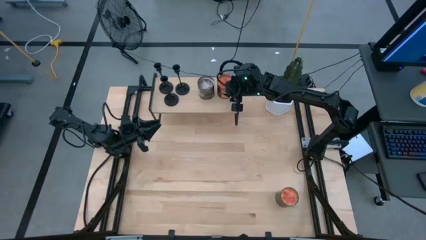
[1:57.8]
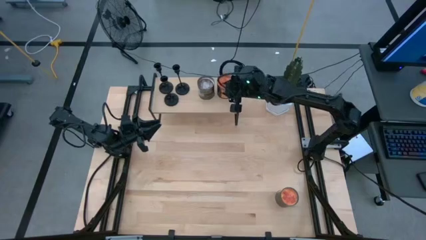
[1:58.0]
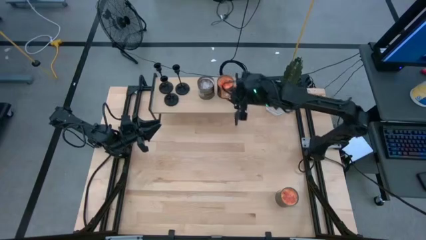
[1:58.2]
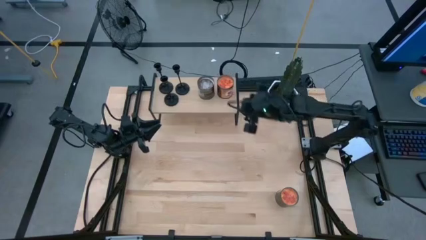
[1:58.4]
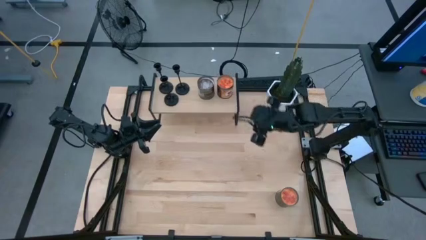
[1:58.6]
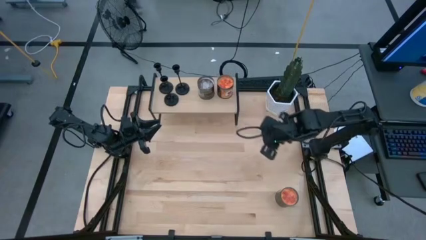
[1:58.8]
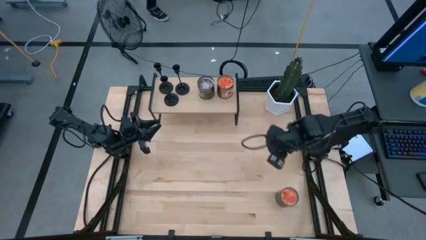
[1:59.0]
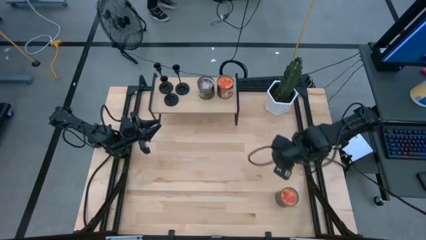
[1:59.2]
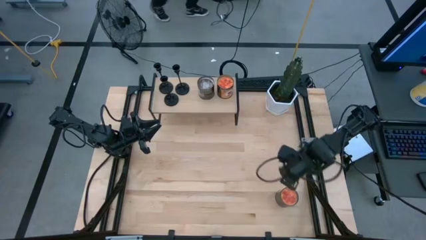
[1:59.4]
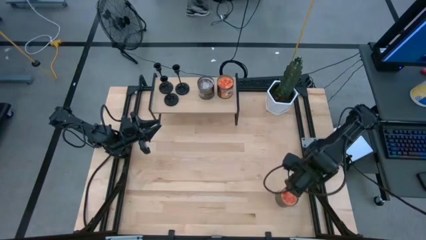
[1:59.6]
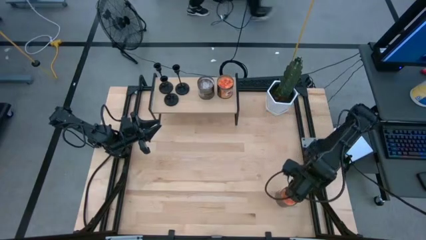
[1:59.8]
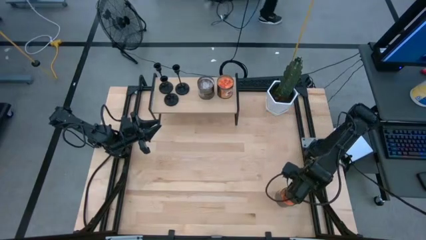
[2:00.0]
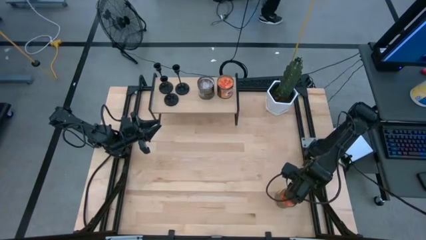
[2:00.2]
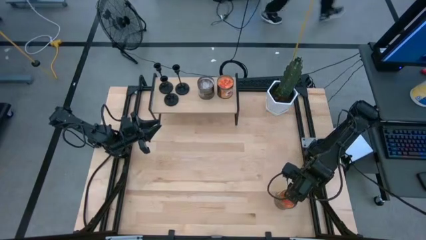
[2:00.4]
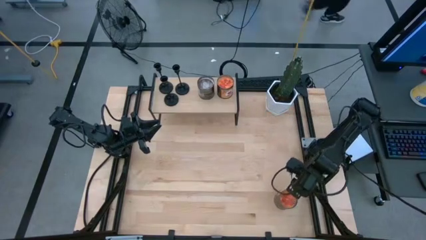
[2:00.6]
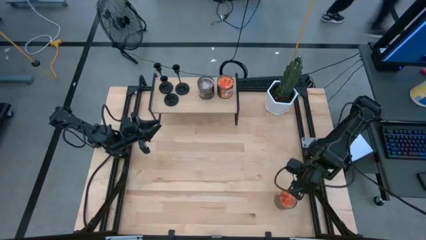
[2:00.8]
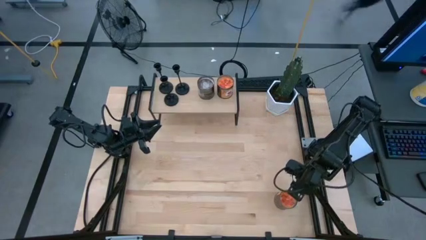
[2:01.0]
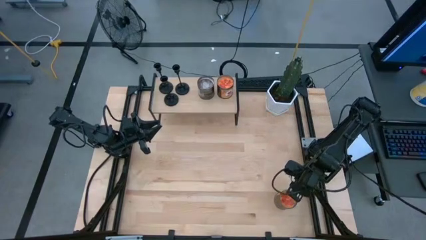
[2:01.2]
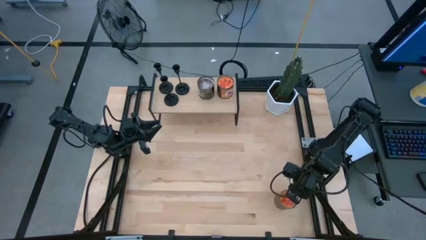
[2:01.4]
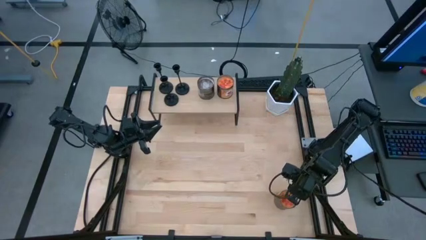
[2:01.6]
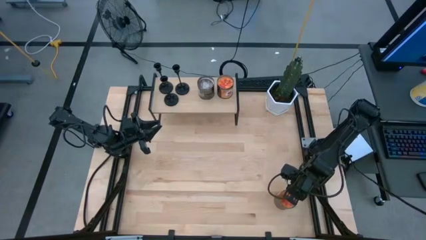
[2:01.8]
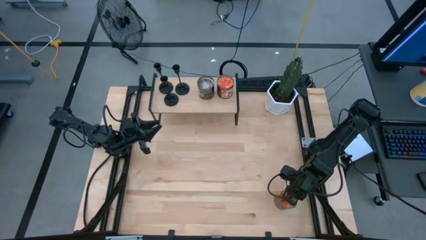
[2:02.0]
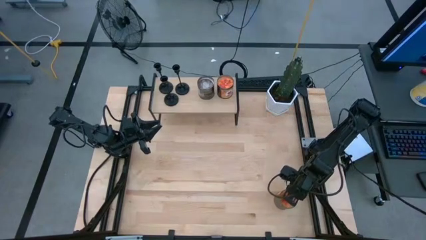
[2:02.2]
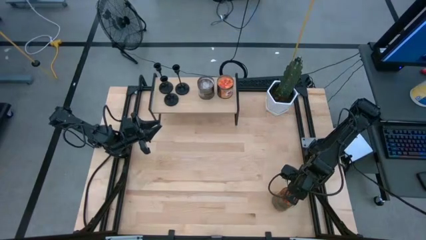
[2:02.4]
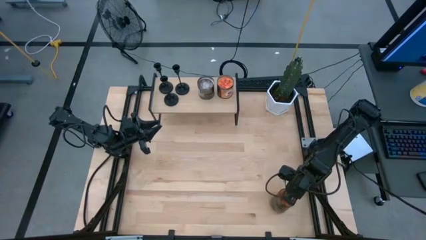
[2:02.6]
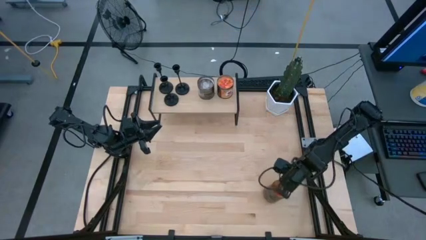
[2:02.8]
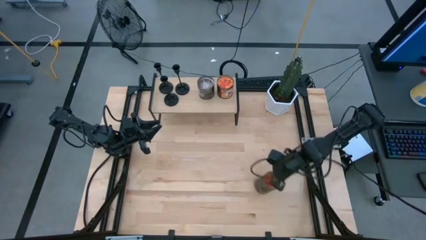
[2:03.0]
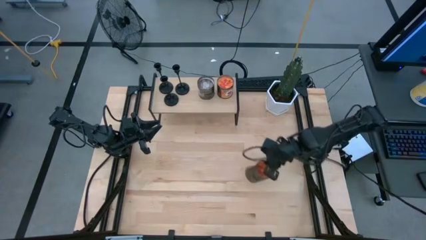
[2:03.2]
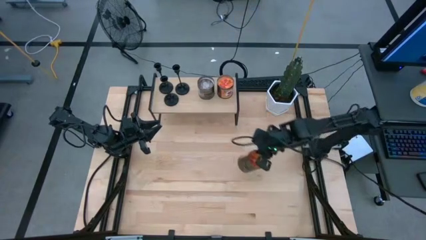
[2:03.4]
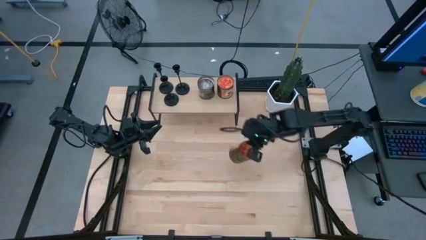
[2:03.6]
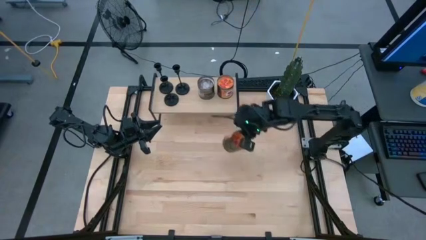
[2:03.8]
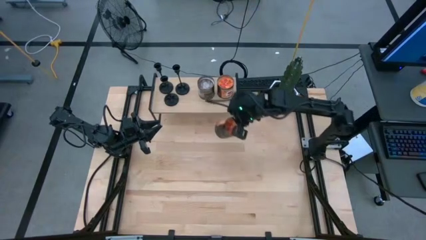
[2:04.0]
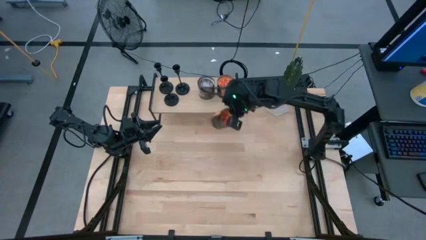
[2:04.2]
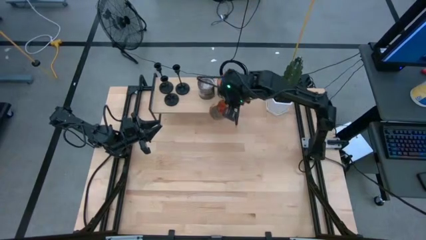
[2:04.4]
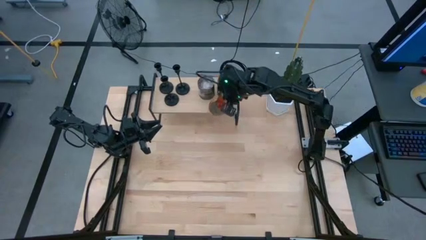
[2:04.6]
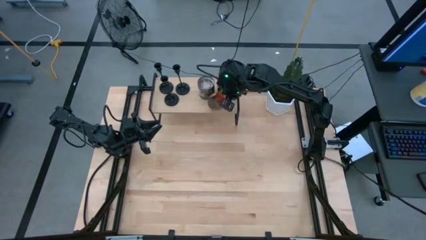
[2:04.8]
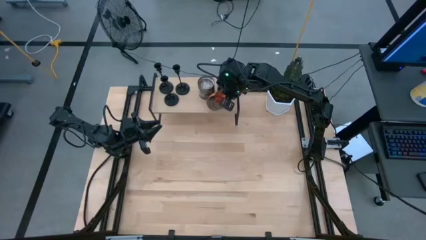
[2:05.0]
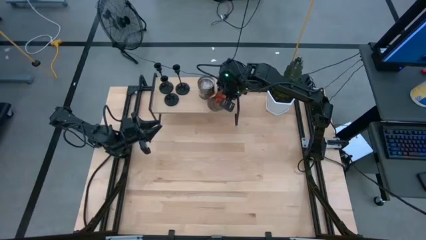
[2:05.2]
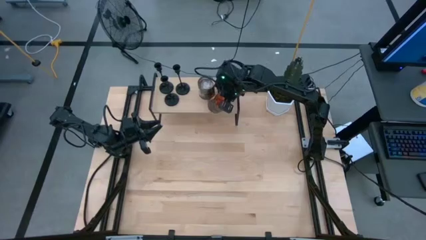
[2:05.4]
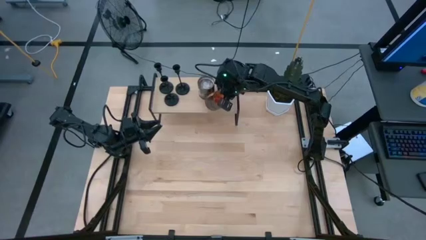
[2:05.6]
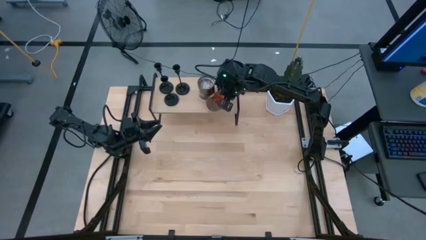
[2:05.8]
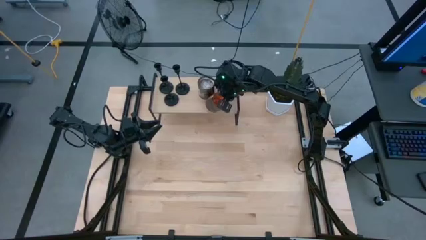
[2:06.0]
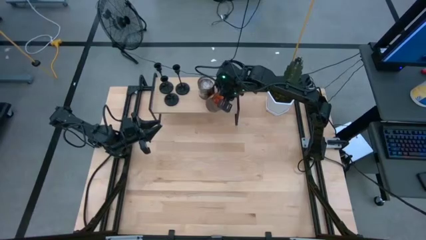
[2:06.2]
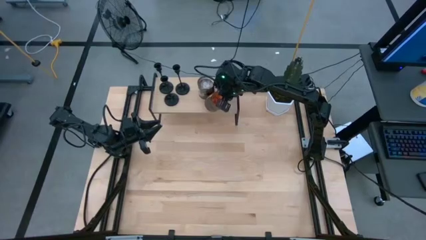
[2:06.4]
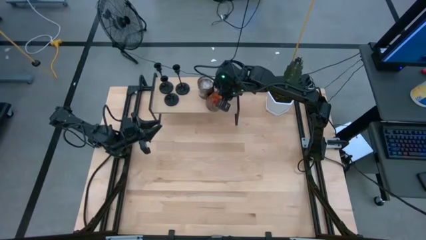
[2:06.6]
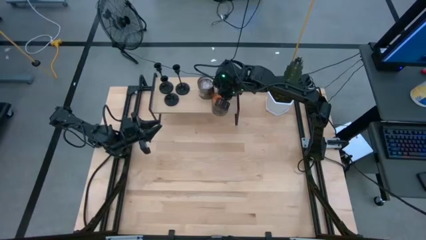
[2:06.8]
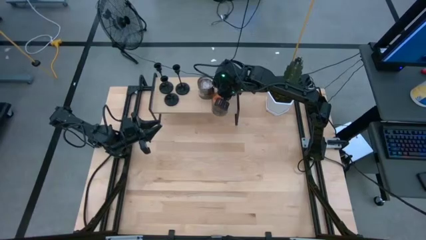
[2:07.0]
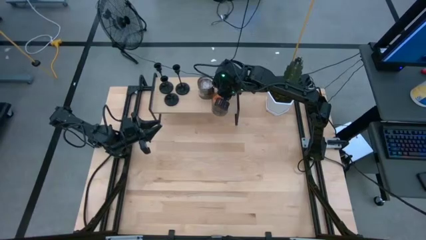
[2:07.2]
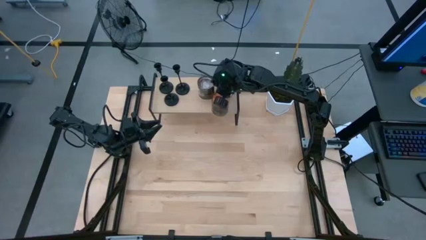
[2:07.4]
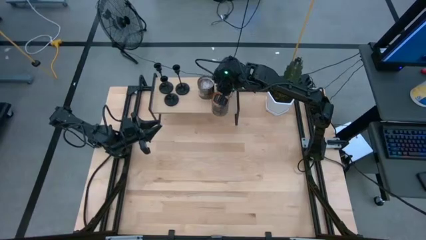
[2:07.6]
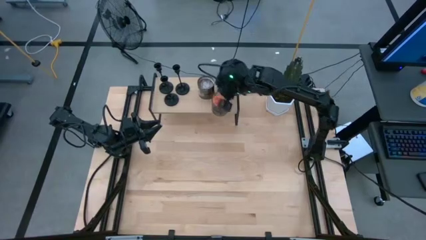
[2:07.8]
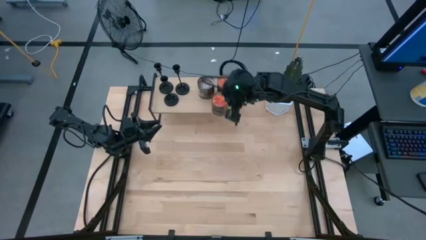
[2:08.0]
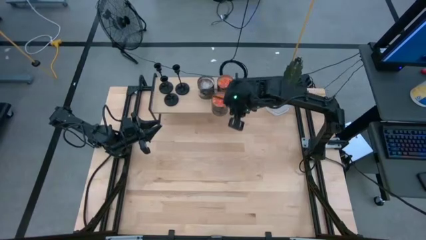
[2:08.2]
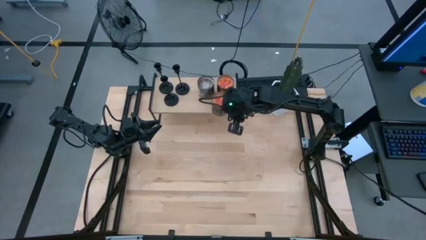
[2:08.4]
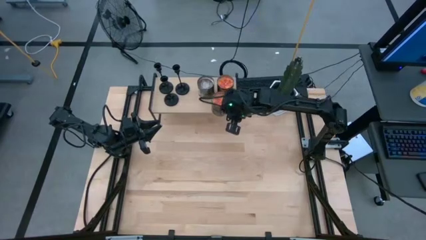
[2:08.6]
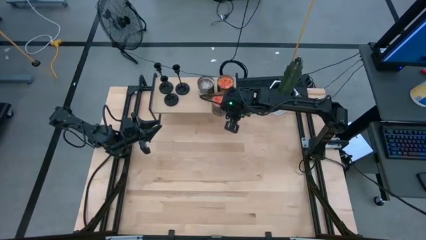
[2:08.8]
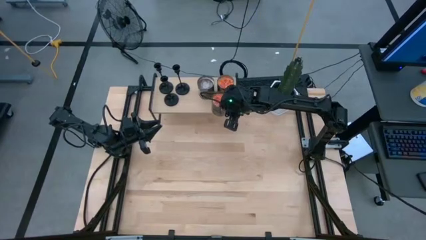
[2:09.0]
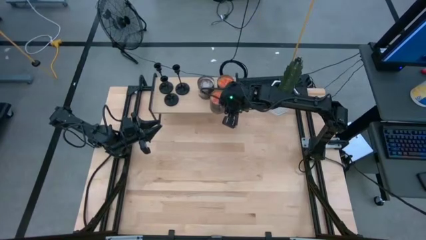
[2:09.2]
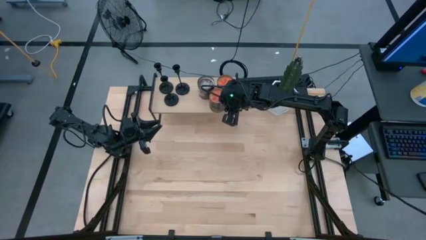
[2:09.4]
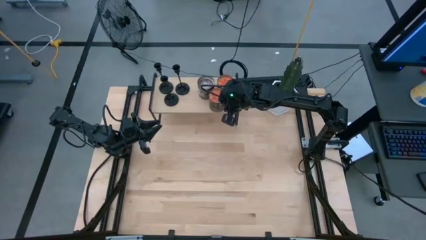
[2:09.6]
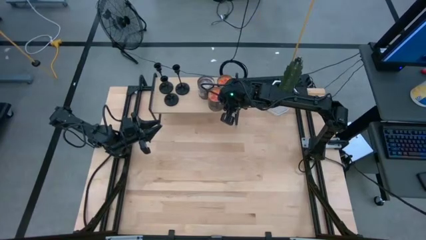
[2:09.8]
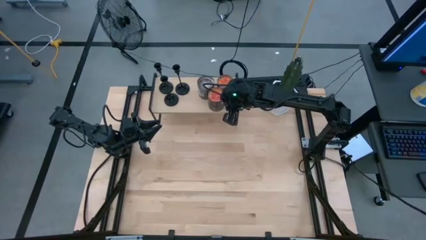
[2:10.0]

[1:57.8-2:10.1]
Task: Pick & Place candle stick holders
Put the orange scented candle on the shelf

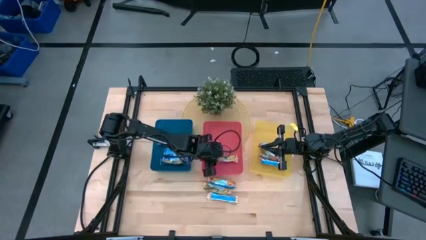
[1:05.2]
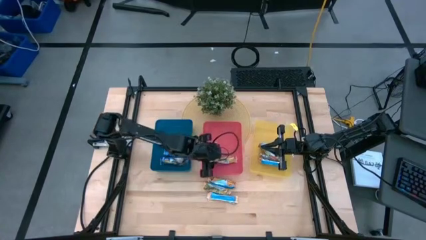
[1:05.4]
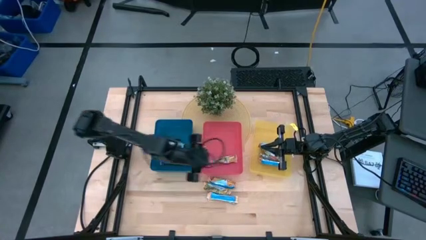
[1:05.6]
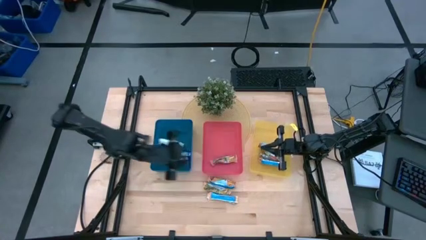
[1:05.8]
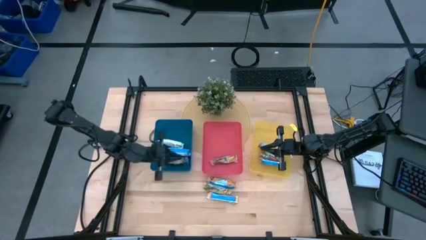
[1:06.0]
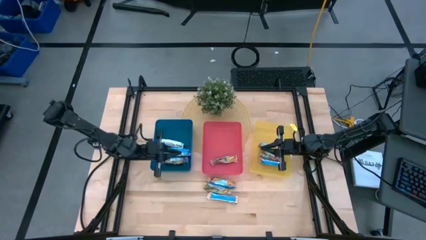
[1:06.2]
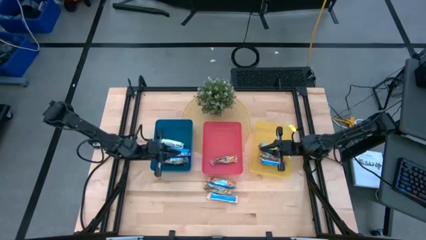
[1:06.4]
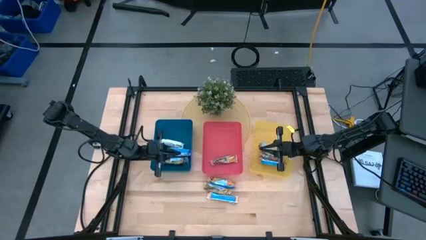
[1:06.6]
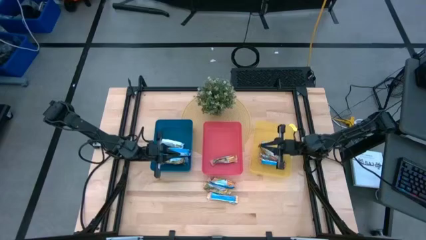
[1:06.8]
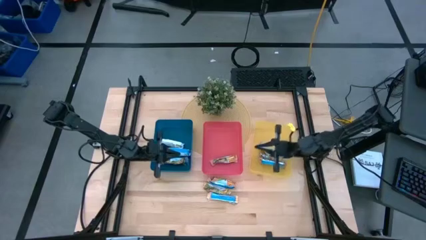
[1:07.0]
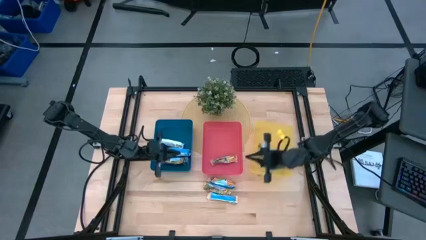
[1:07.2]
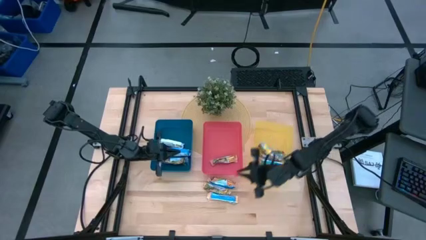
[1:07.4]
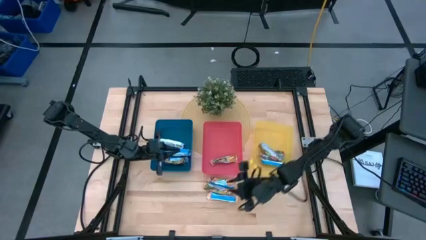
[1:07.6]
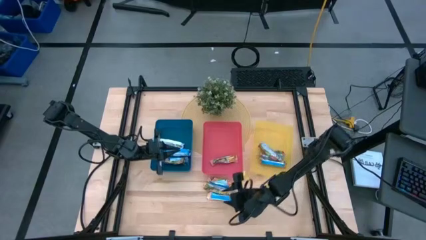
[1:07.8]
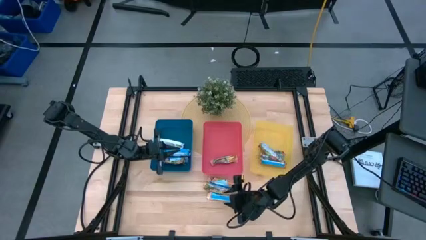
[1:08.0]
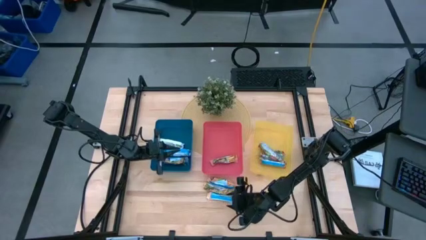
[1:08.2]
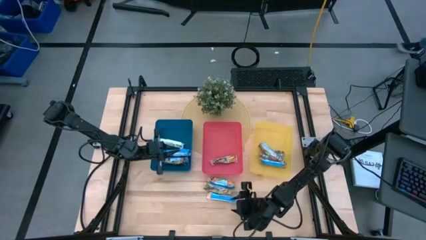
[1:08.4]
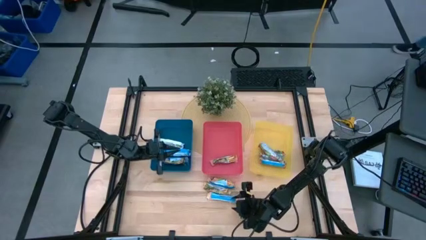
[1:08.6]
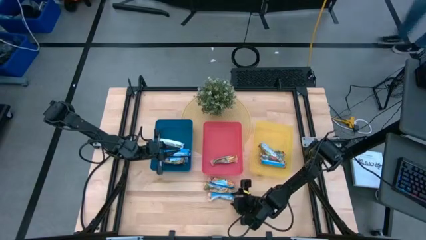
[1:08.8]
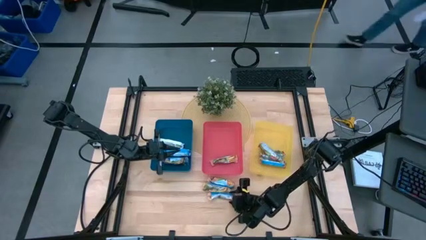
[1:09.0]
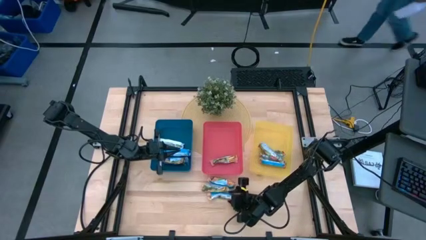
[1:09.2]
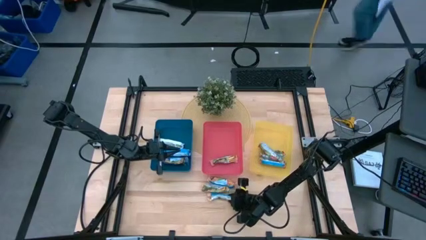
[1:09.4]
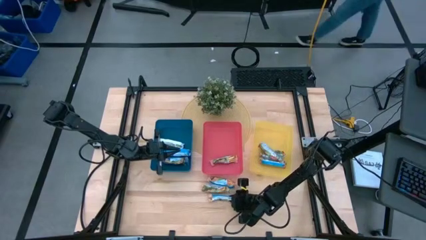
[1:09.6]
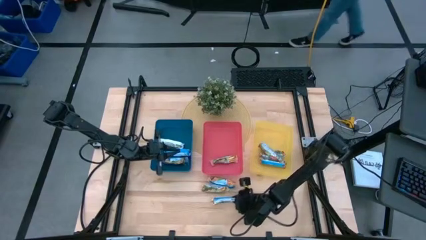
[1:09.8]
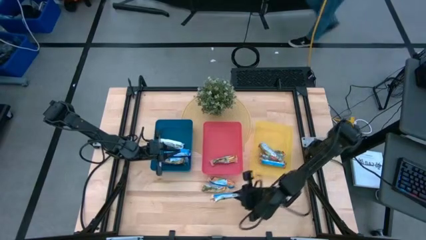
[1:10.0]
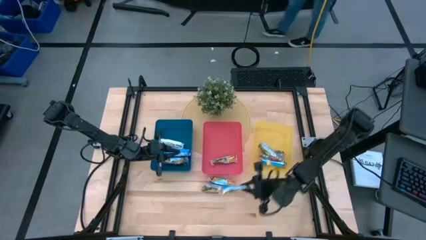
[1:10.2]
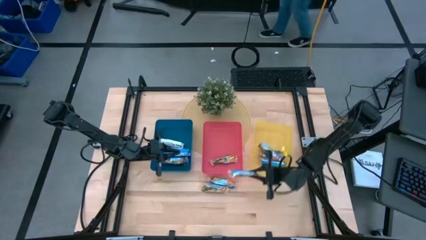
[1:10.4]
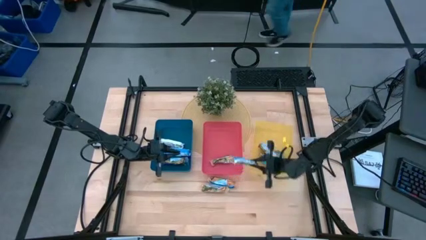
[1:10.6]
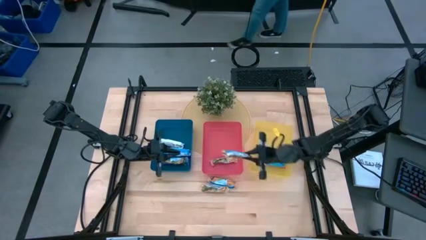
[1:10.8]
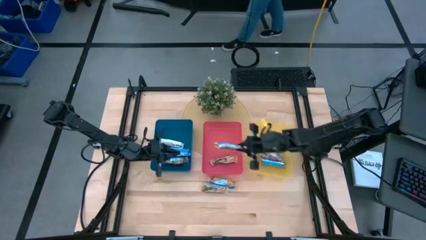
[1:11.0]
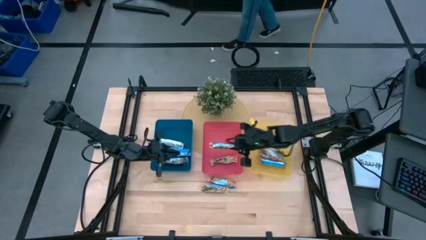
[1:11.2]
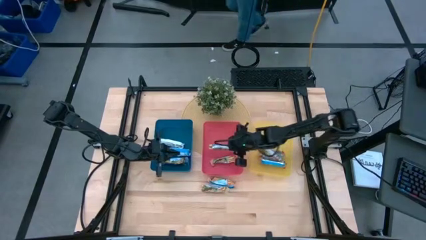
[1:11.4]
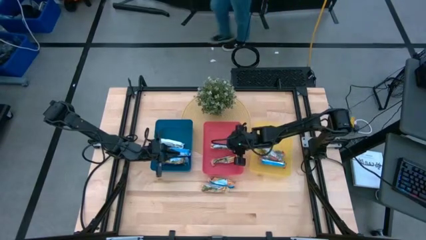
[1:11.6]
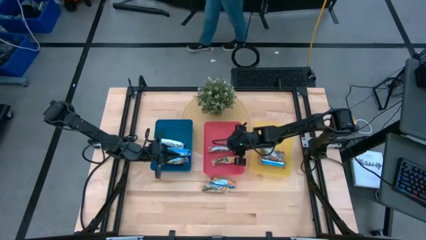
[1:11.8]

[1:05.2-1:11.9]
Task: Pick and place Granola Bars by type
Put the bottom yellow granola bar into the red bin
